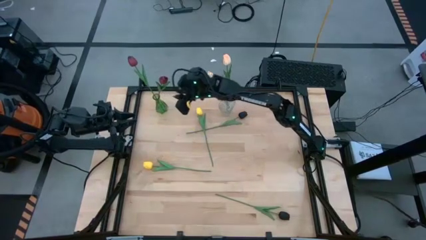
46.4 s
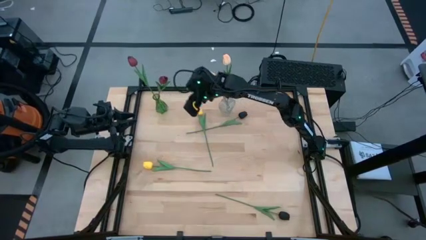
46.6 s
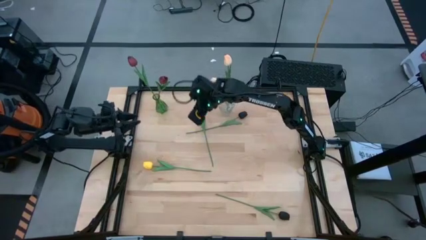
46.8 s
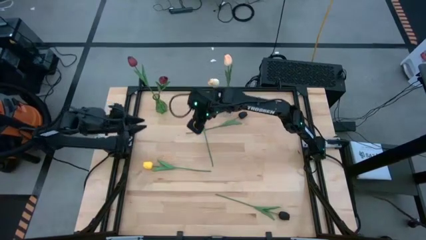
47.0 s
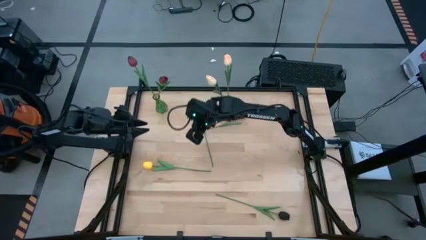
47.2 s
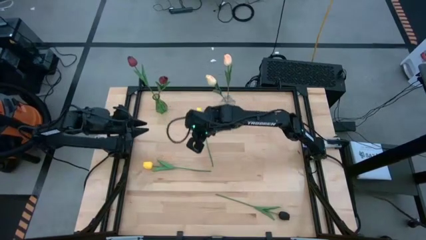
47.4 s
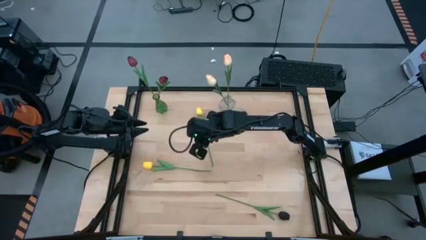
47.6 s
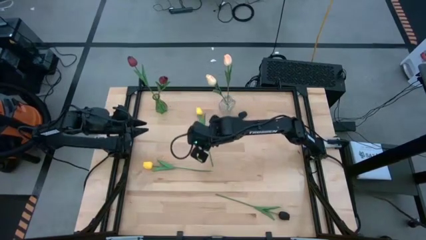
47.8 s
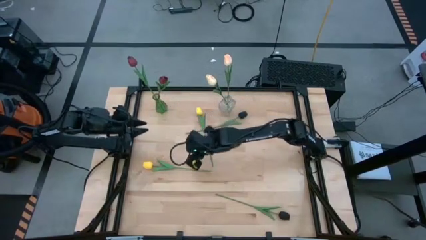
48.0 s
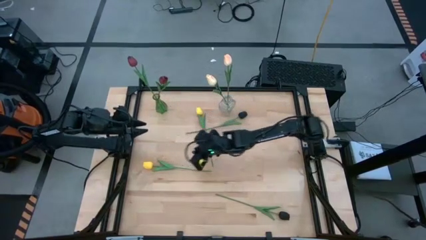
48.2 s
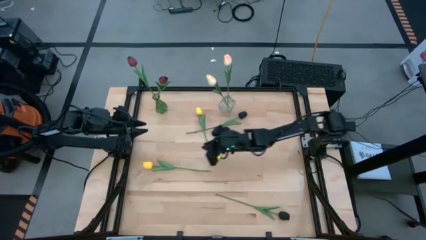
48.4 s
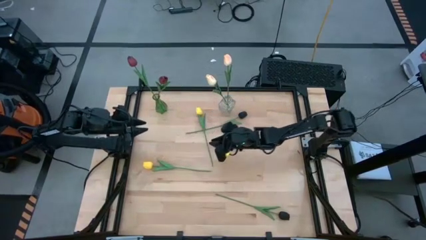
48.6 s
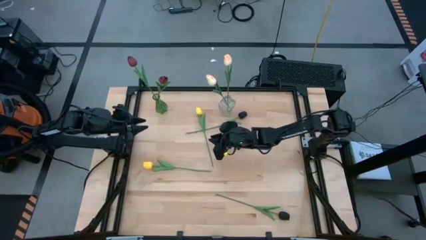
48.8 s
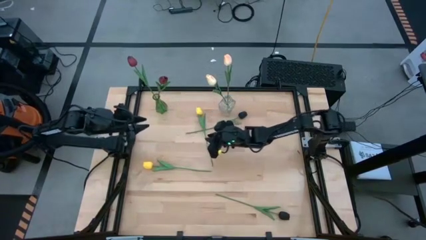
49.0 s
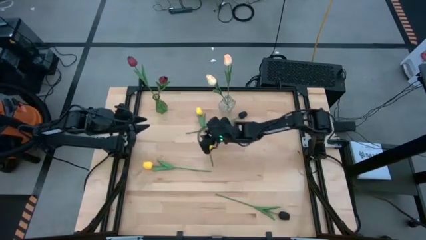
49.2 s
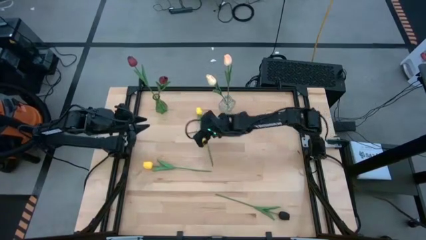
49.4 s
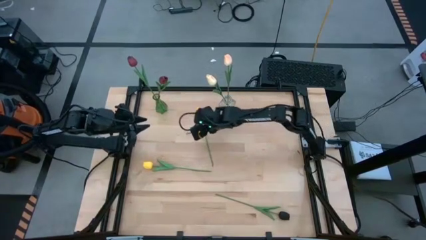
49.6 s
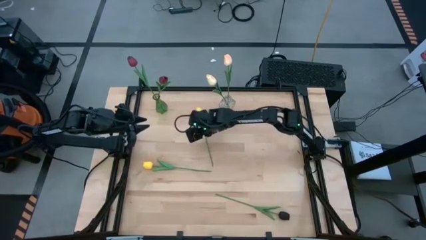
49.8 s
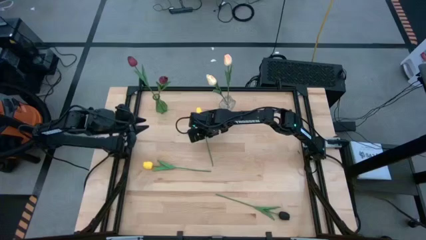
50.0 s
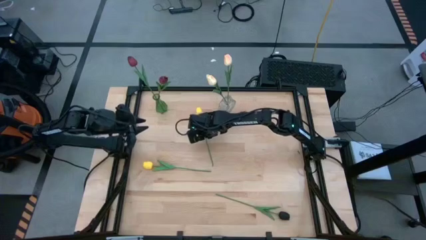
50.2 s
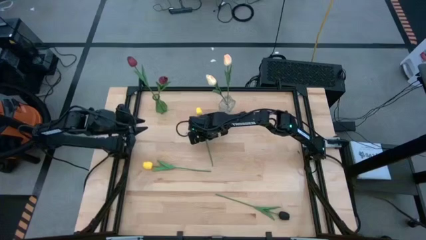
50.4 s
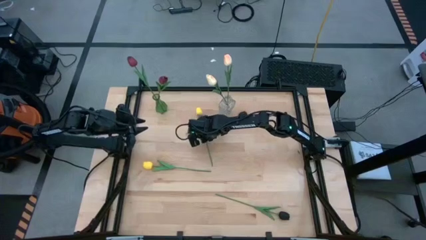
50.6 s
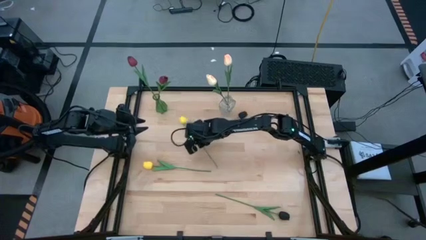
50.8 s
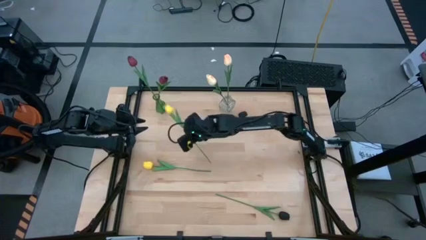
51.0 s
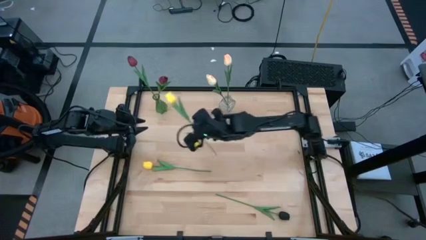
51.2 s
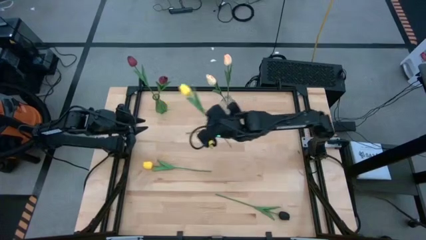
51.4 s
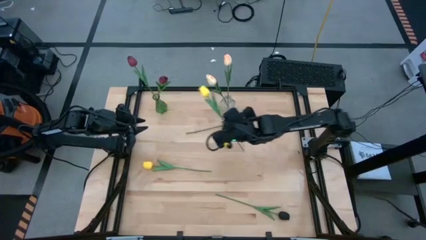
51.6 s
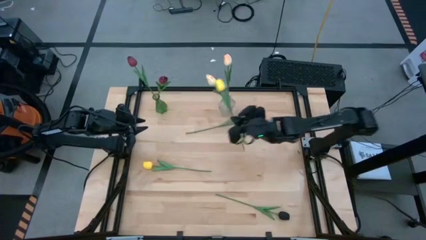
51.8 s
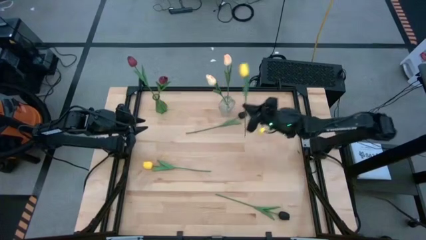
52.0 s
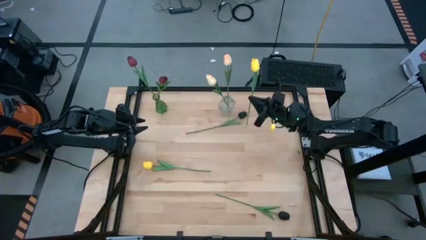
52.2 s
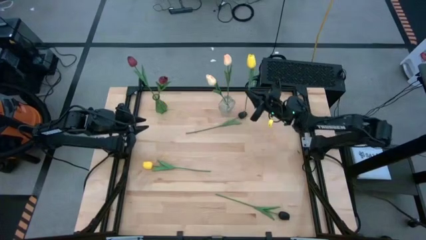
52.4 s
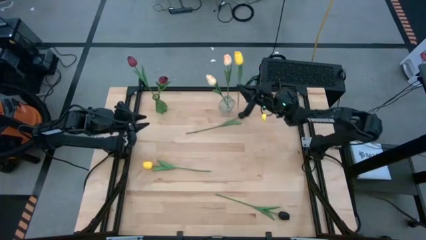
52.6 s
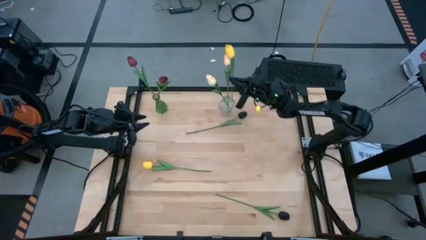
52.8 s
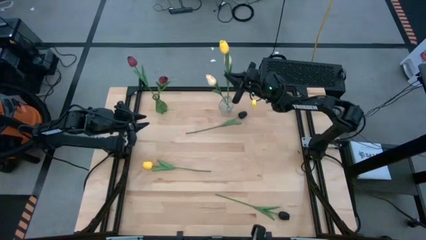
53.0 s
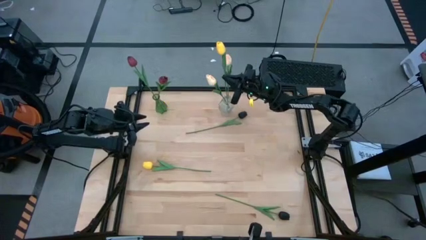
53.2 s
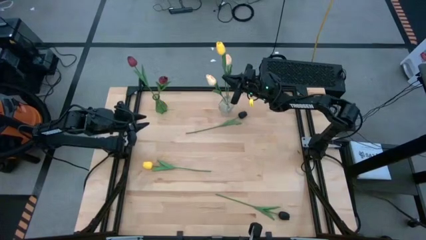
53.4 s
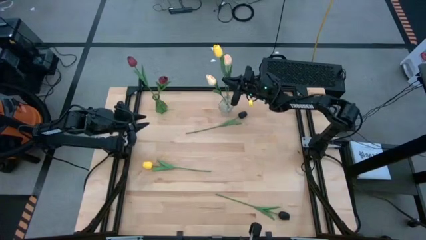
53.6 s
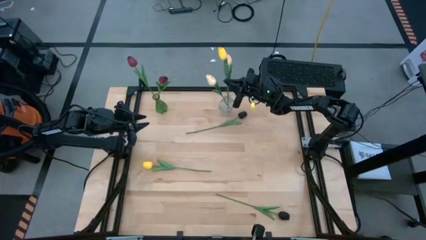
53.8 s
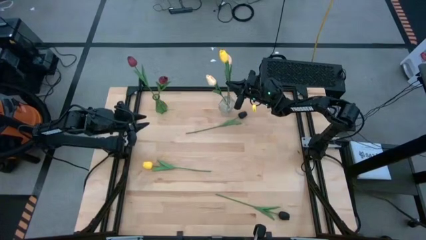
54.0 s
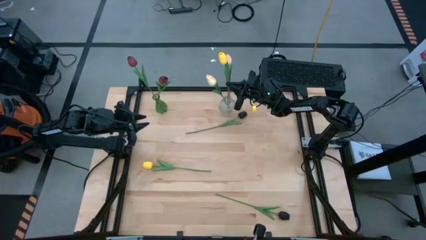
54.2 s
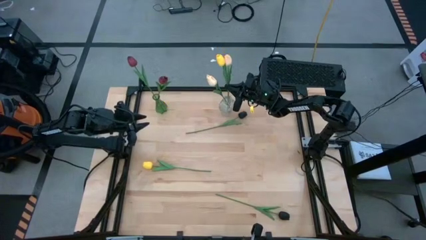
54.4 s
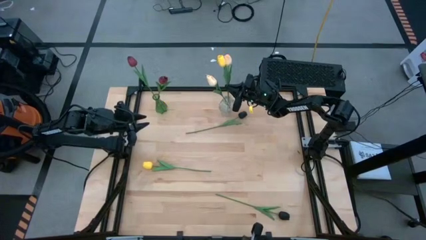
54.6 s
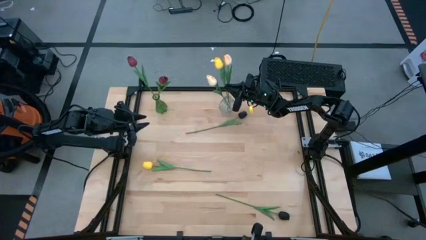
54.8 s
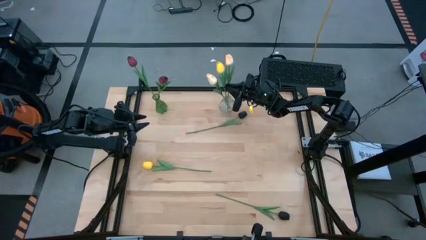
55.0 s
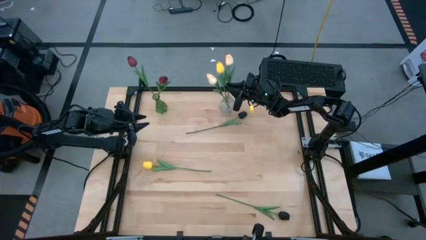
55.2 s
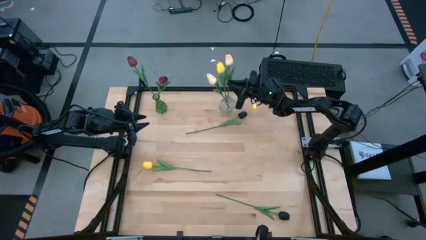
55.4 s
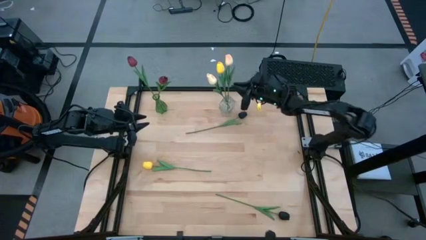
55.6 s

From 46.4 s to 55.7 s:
Task: Sort flowers into vase by color
Put the top yellow tulip into the transparent vase

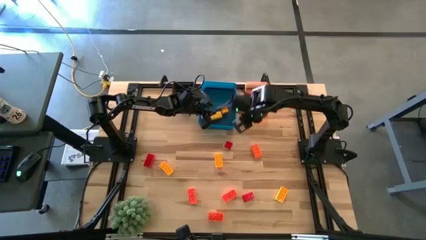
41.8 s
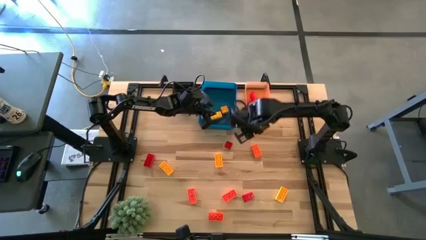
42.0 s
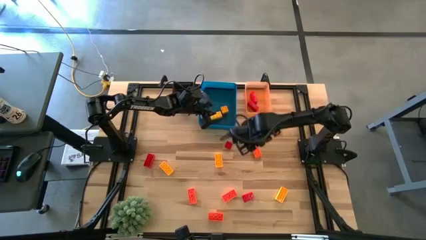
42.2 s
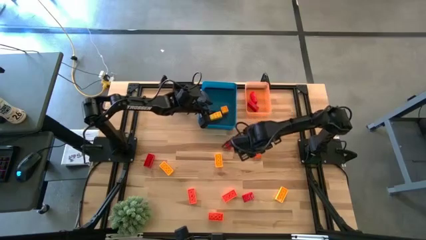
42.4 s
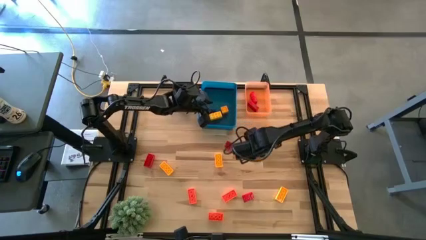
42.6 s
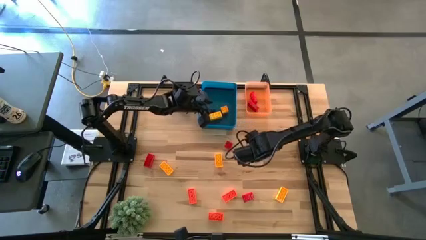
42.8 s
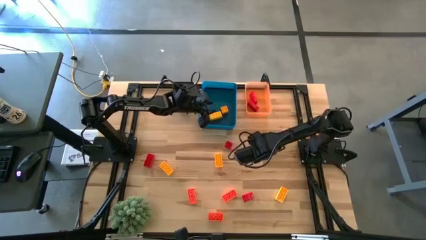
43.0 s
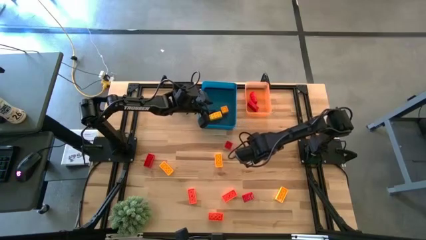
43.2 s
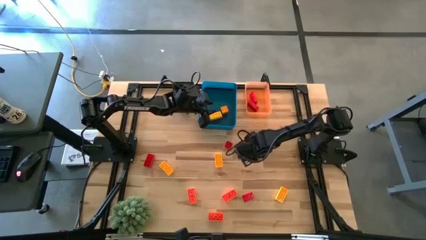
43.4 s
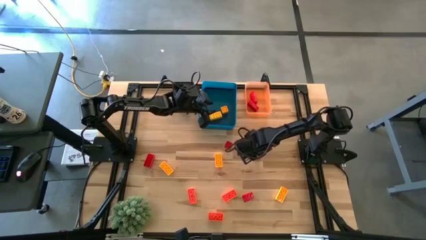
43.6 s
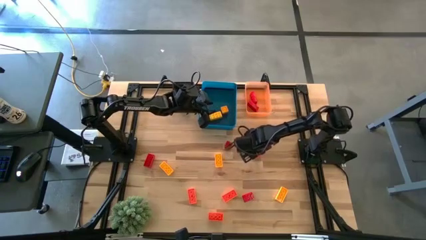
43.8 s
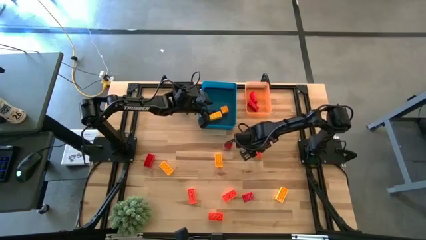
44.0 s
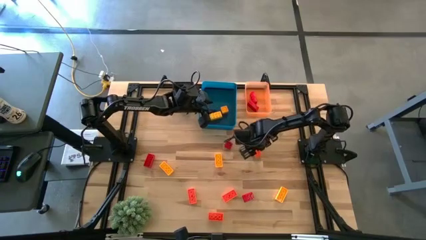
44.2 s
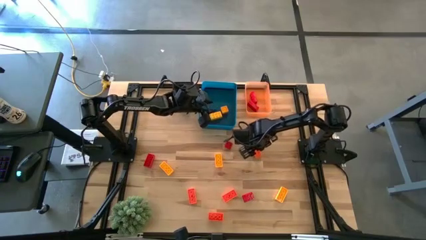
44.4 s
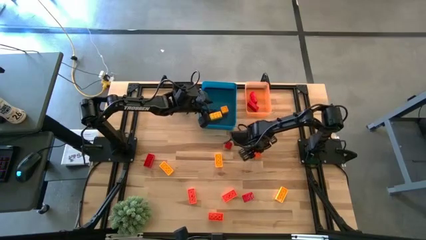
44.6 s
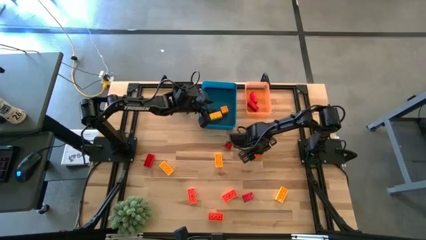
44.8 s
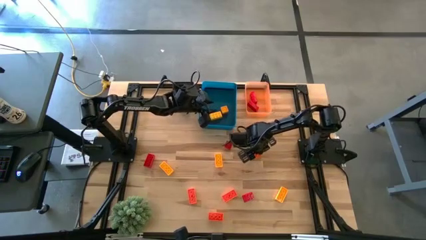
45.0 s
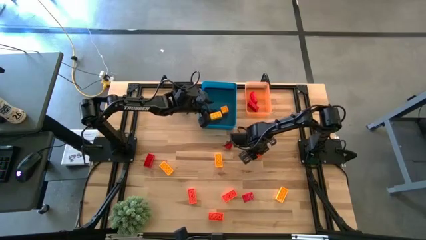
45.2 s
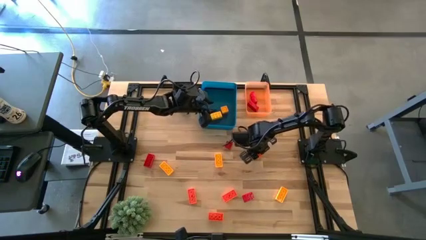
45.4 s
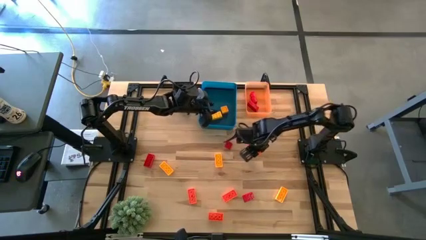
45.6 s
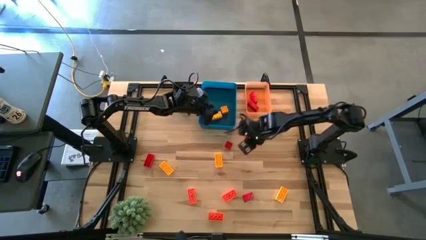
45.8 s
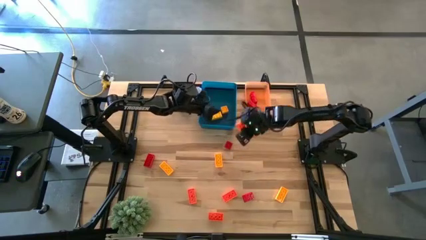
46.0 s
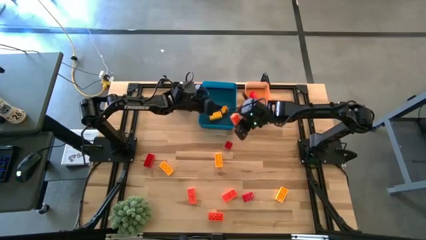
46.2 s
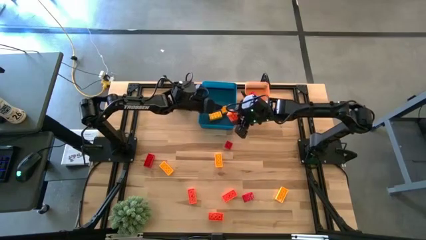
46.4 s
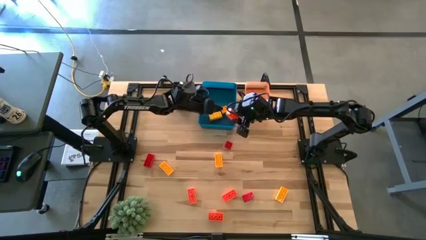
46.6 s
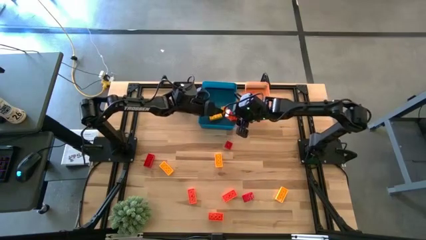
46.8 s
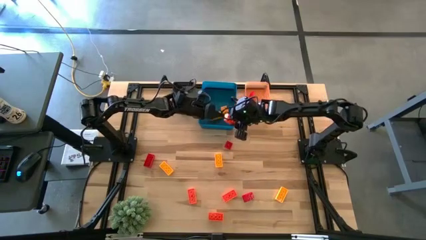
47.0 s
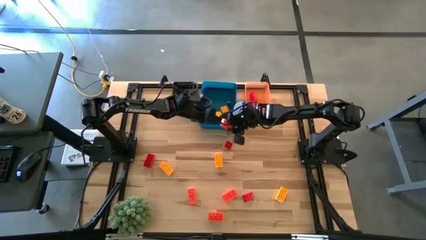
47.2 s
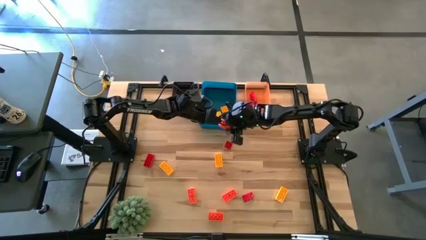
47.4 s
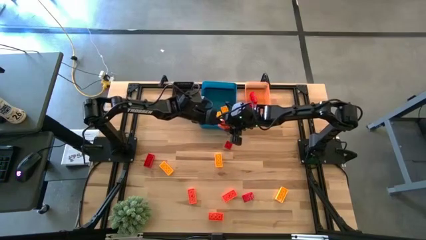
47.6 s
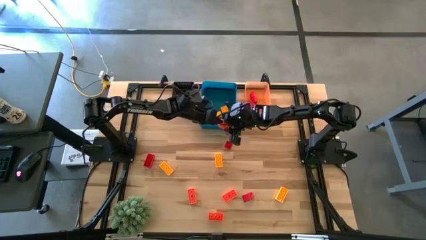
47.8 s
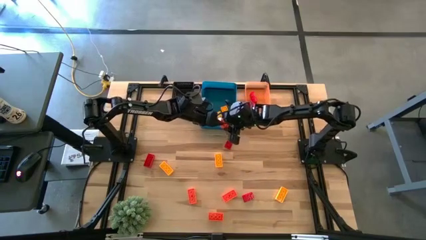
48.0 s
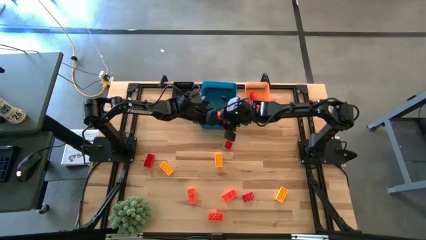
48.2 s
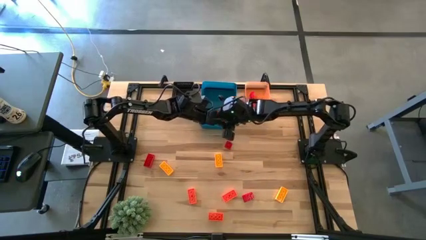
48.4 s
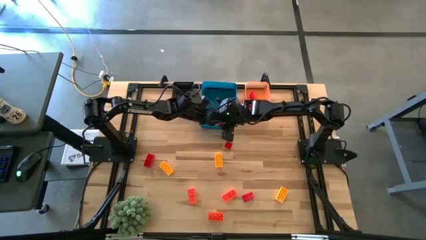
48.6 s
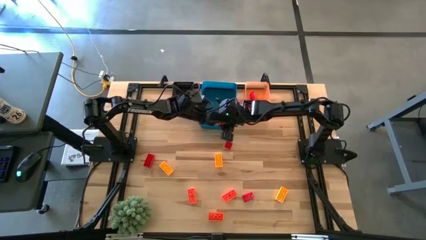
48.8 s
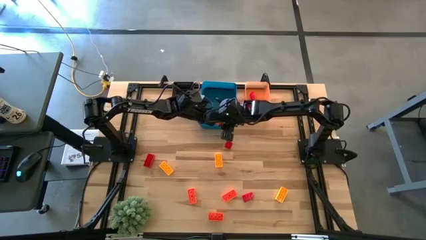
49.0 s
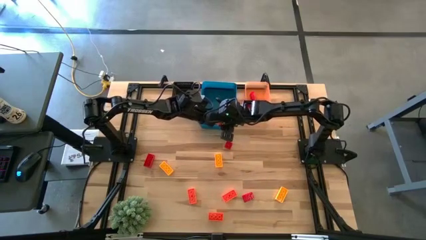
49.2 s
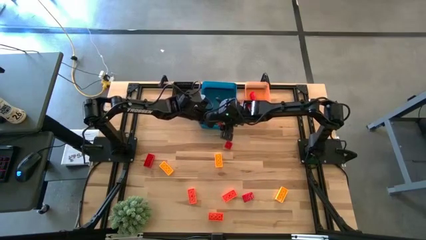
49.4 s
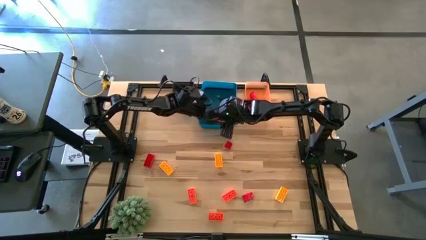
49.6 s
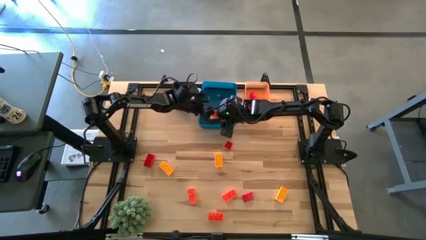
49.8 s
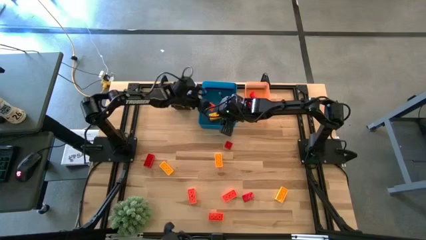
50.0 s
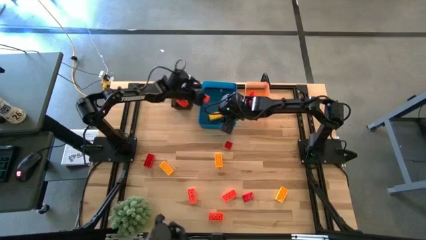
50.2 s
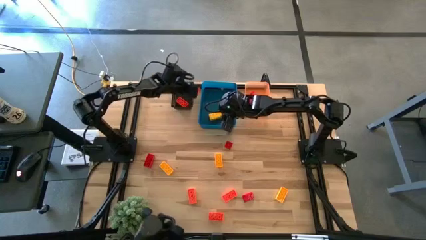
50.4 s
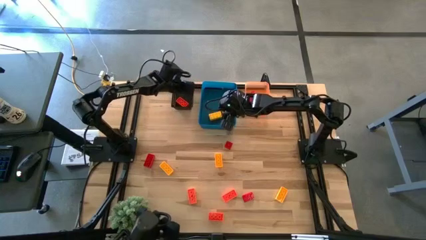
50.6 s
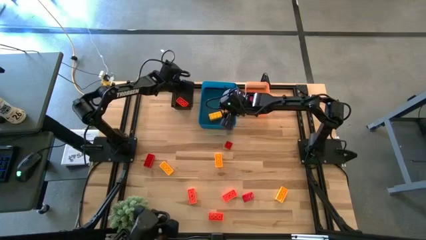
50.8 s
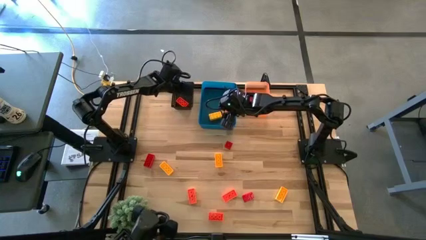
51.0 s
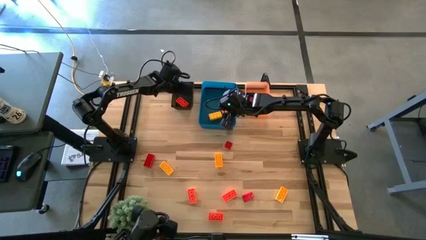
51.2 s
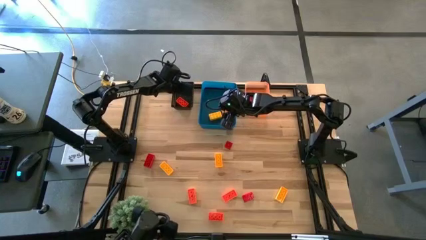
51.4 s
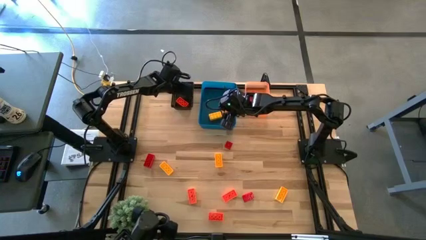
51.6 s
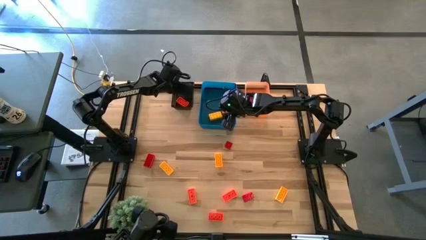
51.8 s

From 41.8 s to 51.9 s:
Task: Sort & place blocks by color
Put the orange game piece into the black bin
